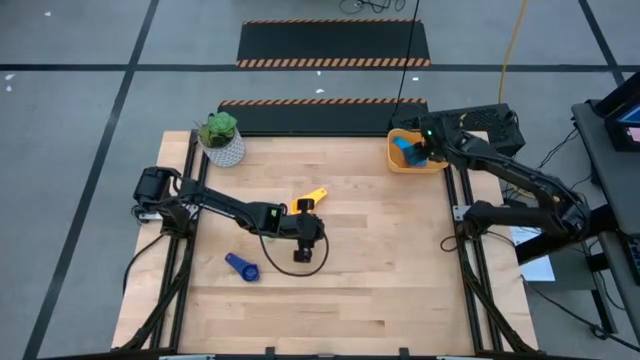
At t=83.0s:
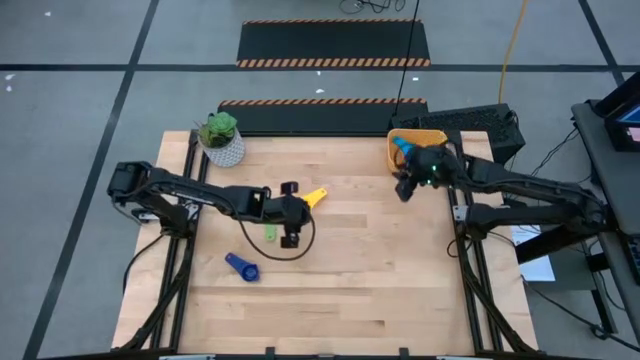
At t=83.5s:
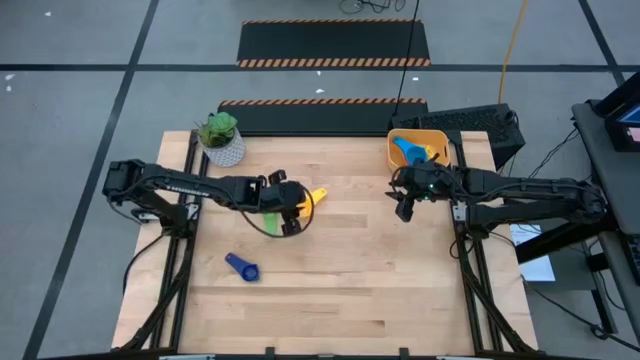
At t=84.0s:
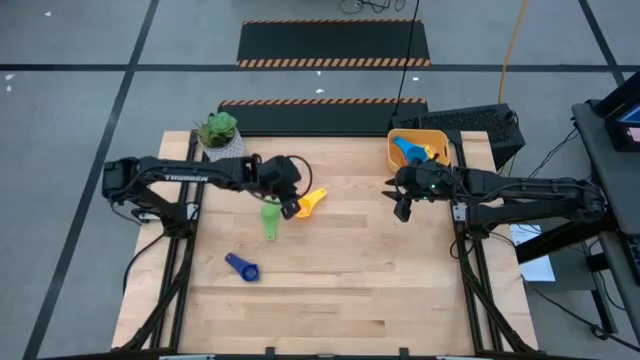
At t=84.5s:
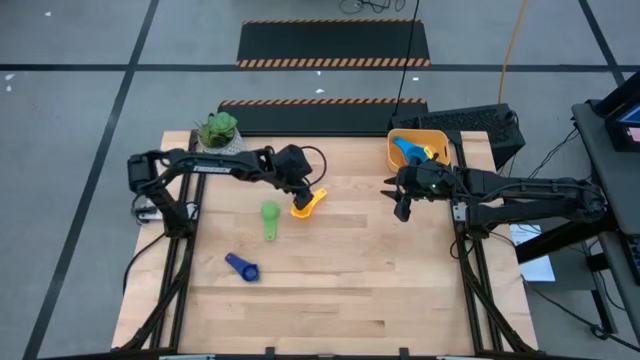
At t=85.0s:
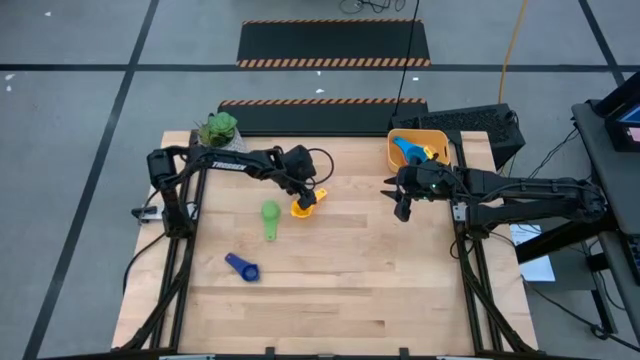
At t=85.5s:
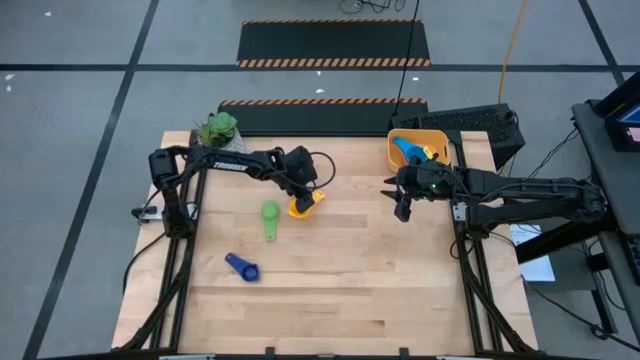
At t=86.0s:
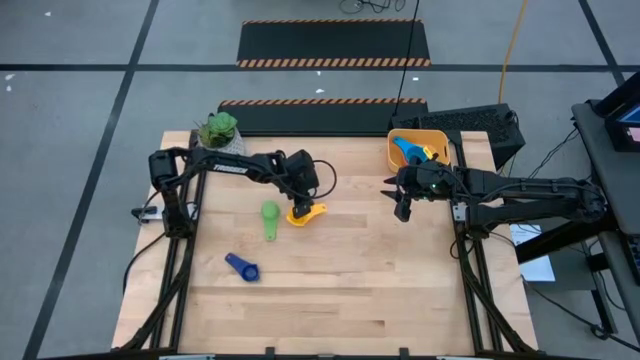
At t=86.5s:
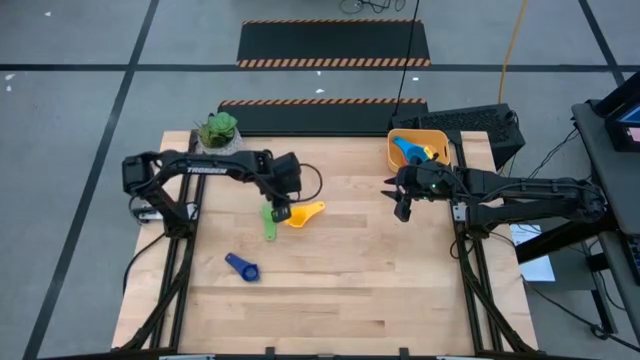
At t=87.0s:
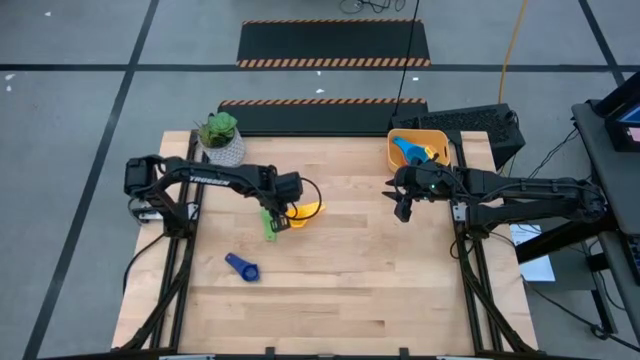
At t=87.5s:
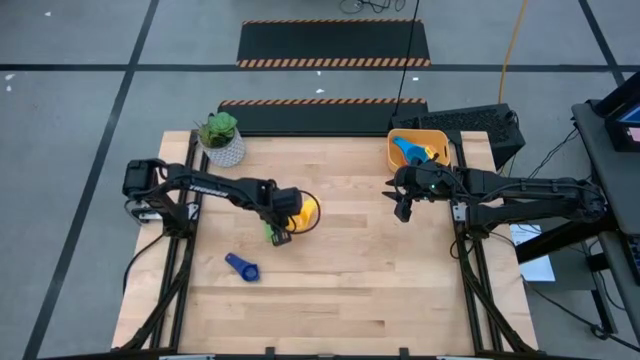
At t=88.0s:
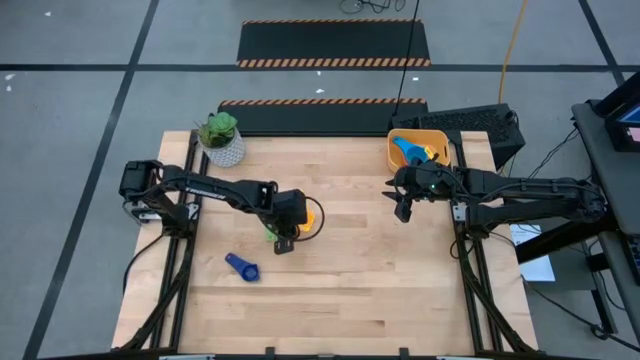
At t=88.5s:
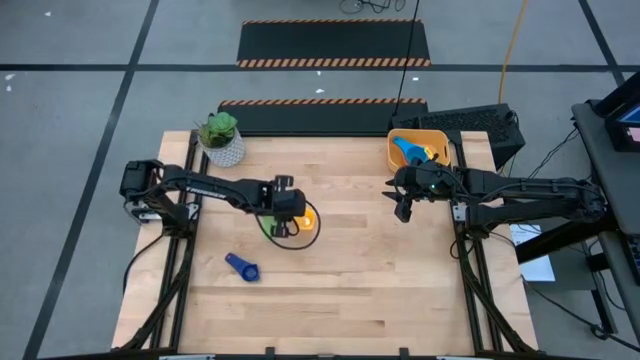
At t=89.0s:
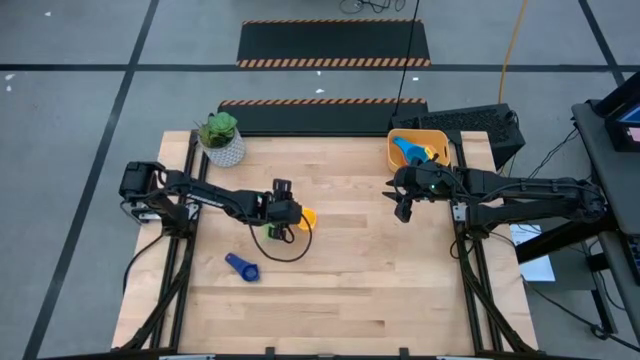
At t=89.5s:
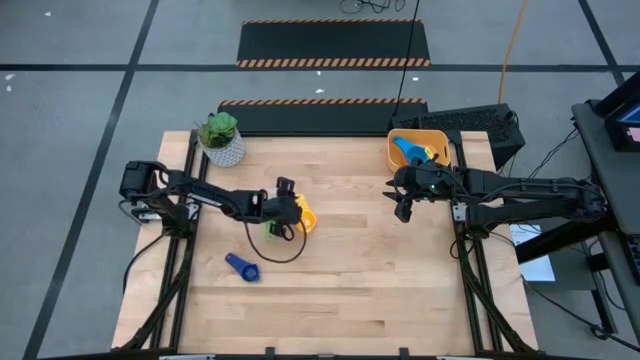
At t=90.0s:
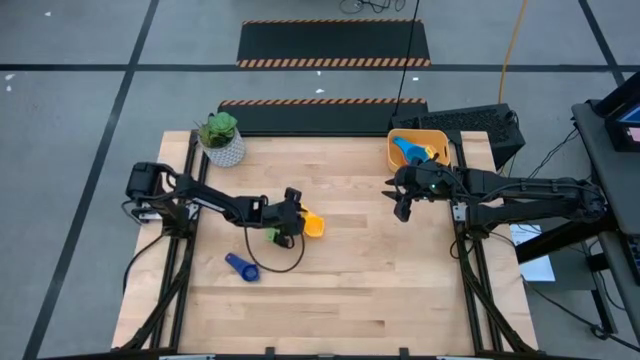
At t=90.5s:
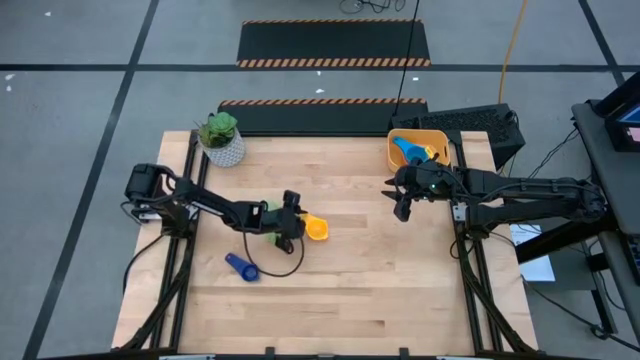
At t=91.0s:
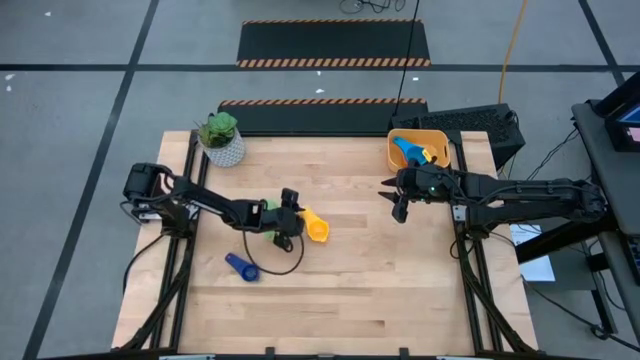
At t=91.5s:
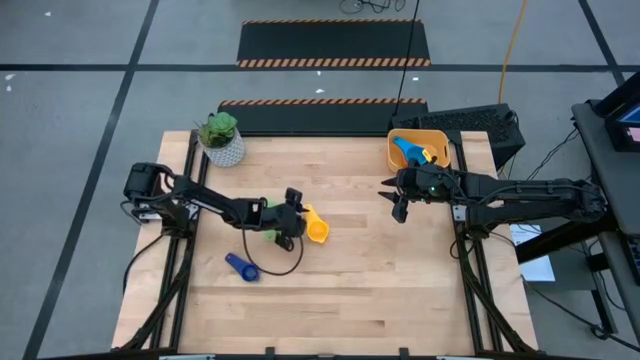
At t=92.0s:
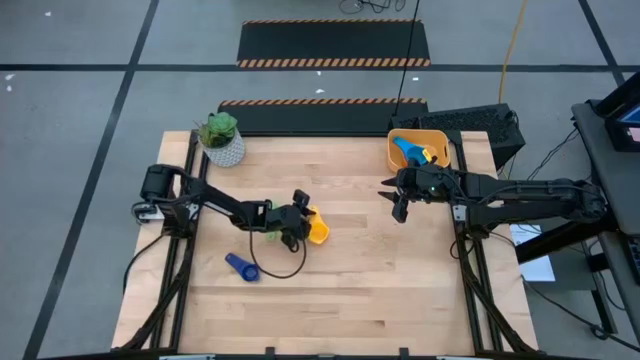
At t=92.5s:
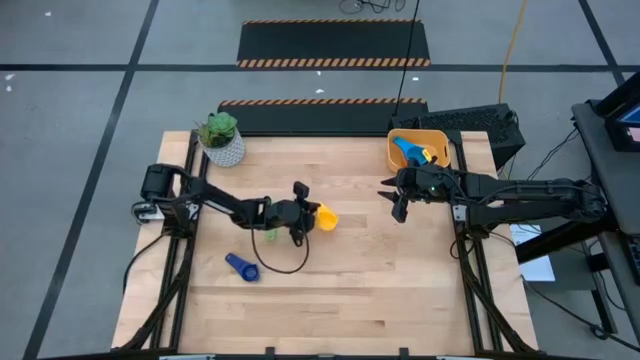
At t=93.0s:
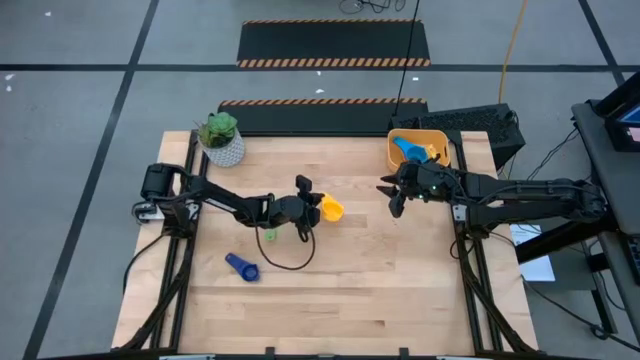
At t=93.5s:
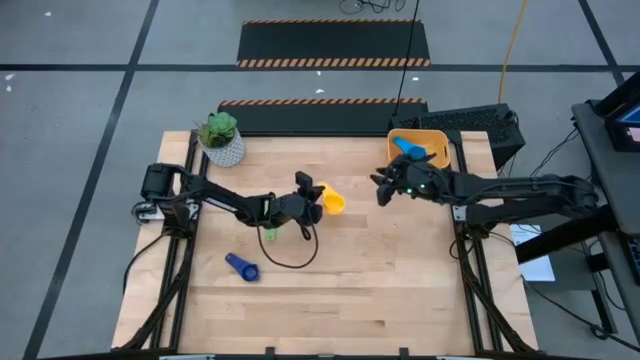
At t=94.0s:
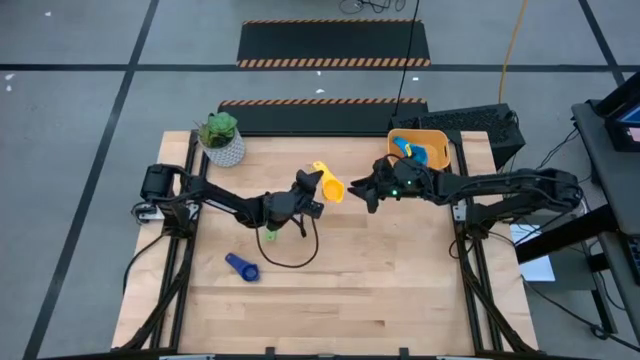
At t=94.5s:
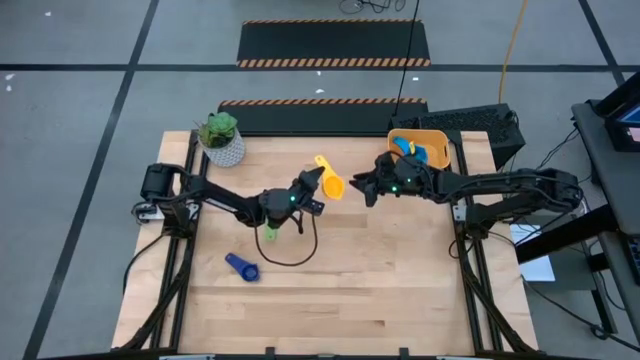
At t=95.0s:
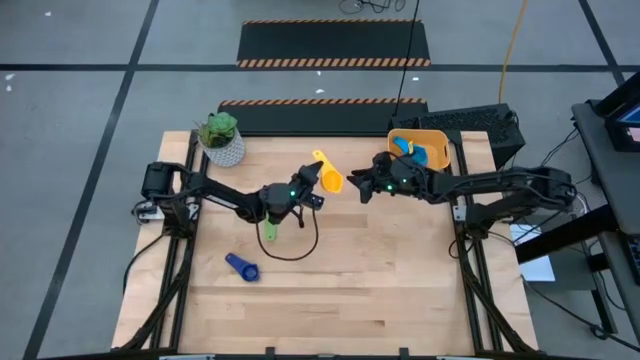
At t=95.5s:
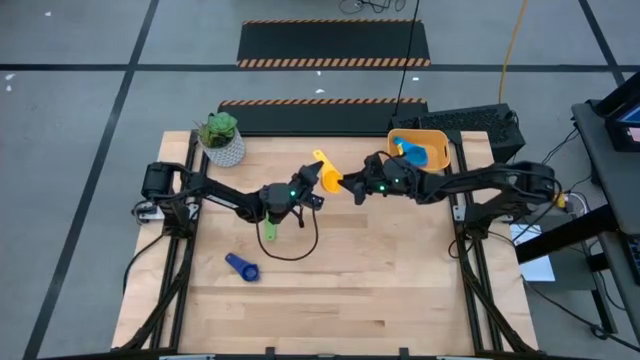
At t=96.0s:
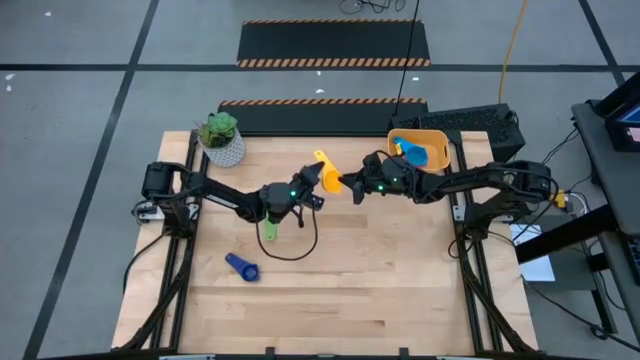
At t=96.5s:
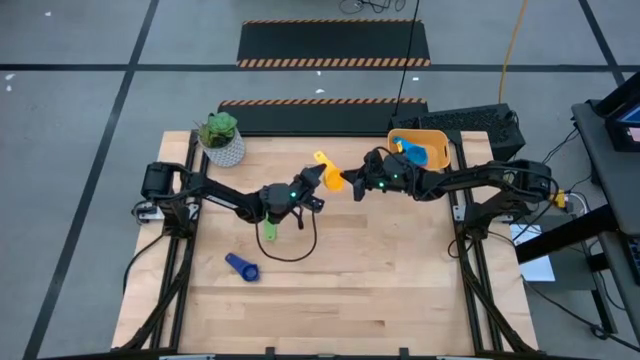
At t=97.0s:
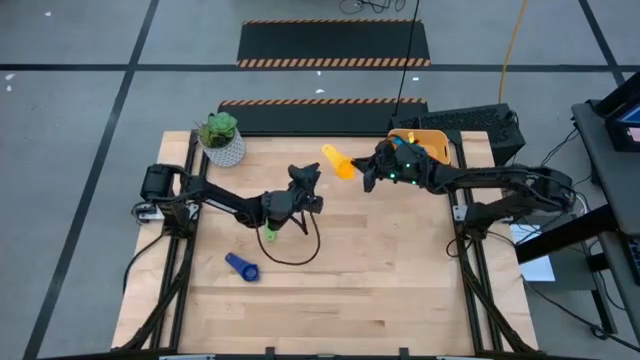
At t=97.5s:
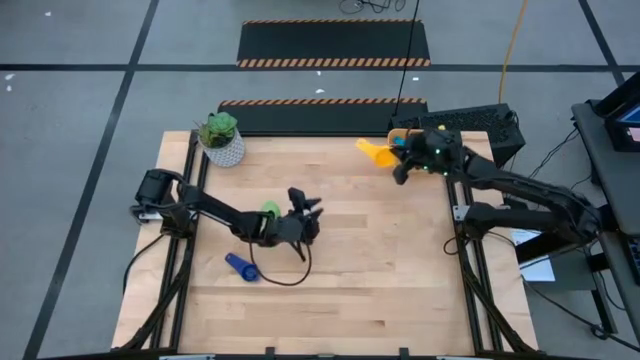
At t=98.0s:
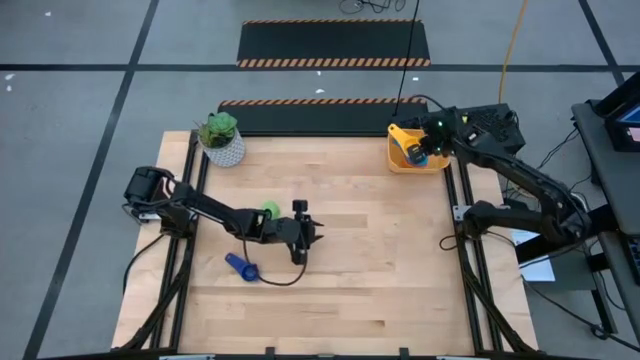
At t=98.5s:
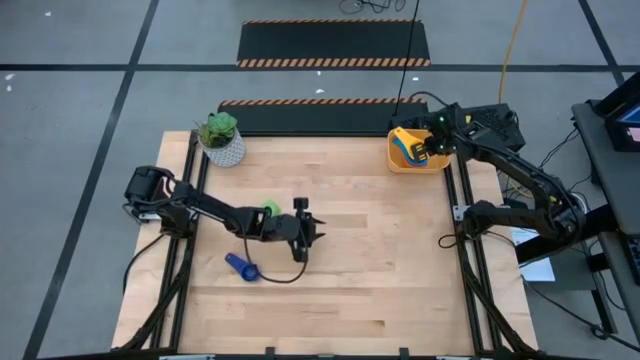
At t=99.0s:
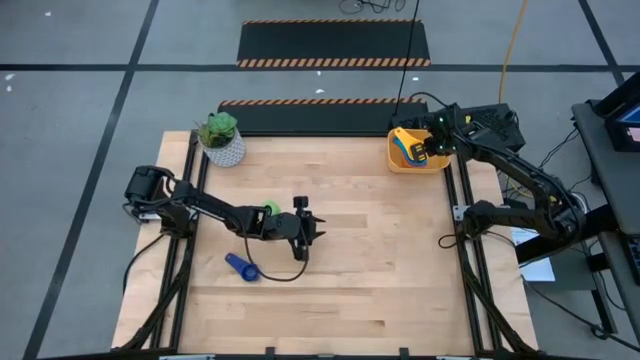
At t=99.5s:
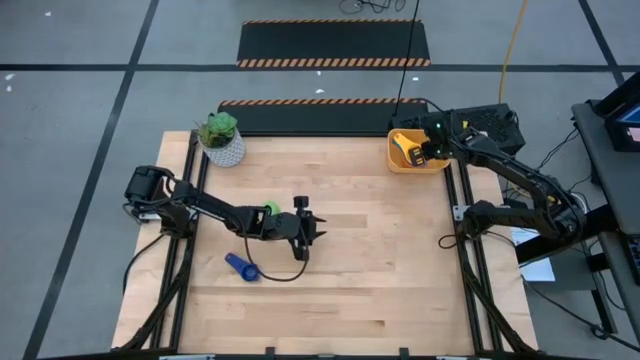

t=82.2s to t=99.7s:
Task: Nest measuring cups in basket
Stack the yellow measuring cup on top of the light blue measuring cup into the bin

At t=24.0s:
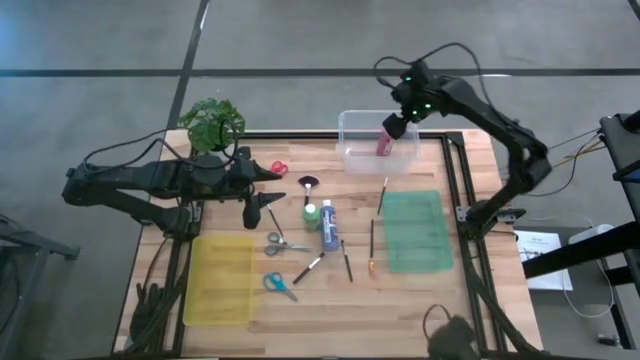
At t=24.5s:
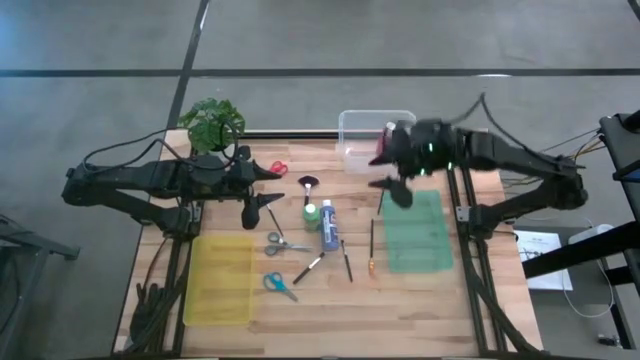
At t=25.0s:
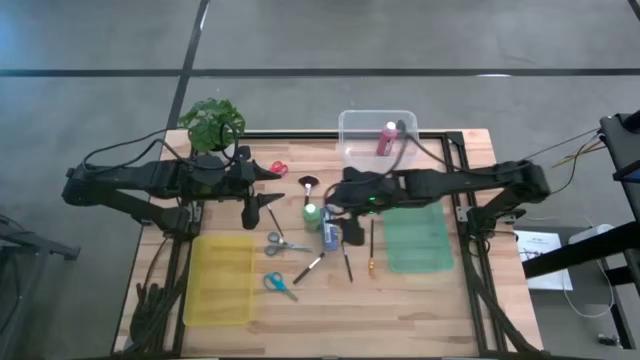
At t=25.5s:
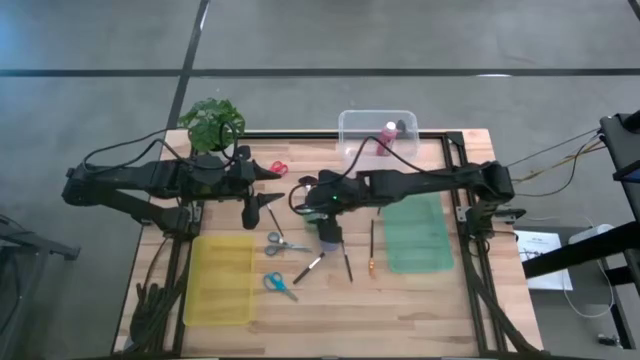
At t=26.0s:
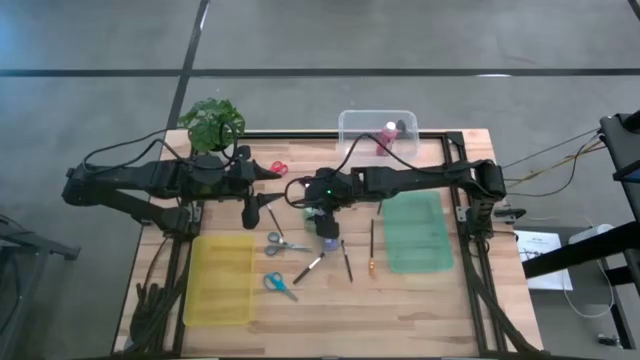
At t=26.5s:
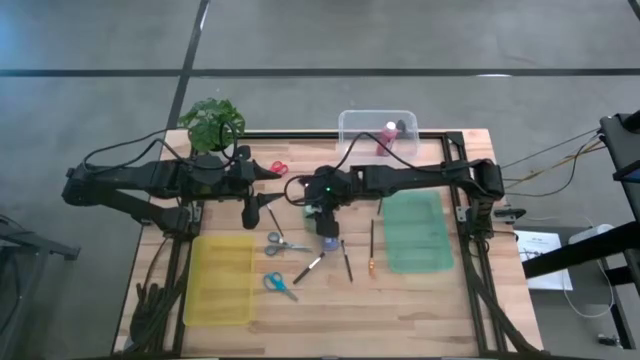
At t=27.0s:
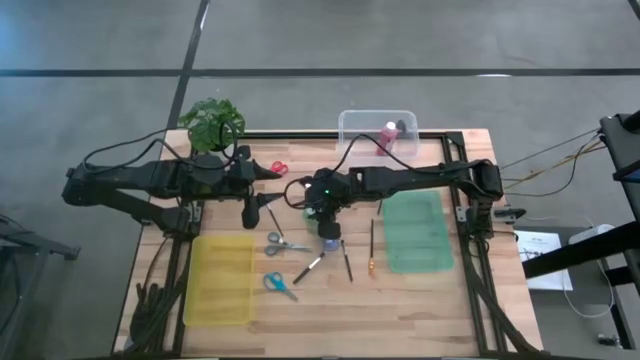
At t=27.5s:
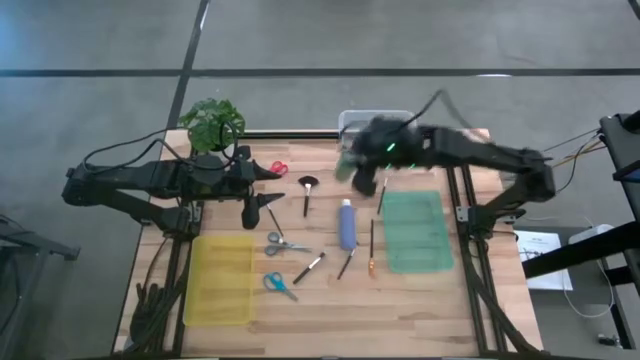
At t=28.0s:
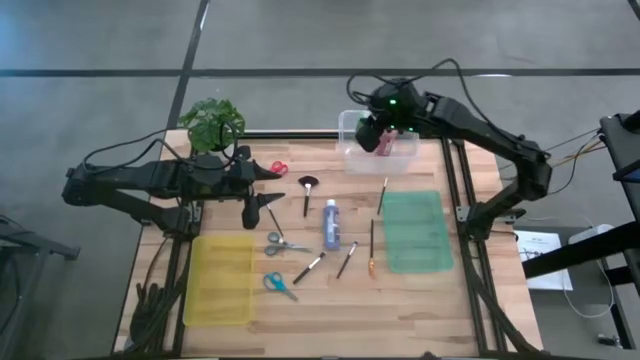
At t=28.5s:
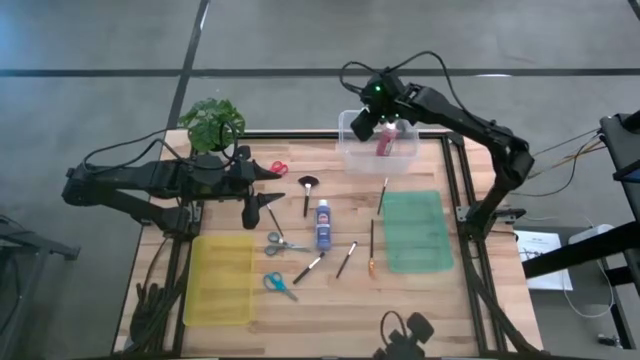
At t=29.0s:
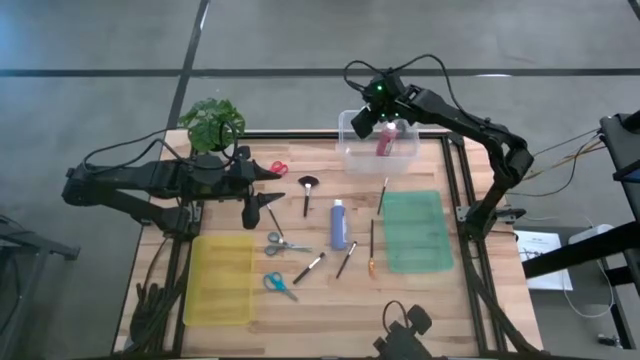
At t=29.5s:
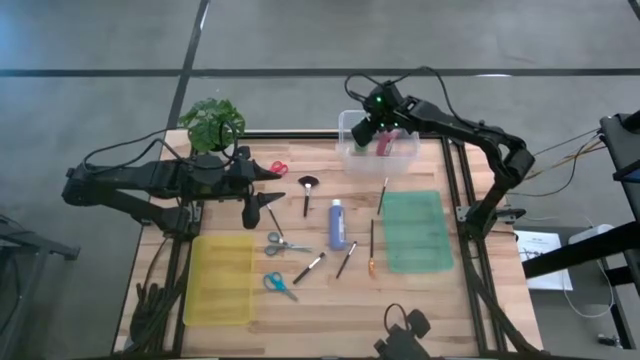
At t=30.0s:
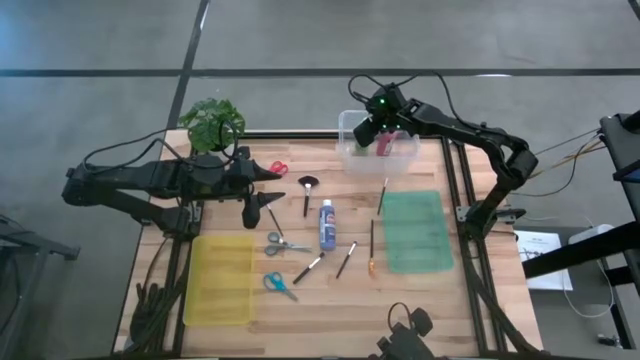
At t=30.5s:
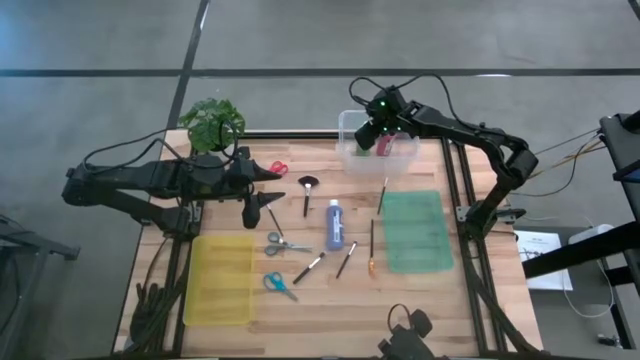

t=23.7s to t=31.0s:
Task: Pick & Place Paint Supplies
Put the green paint bottle into the transparent bin
